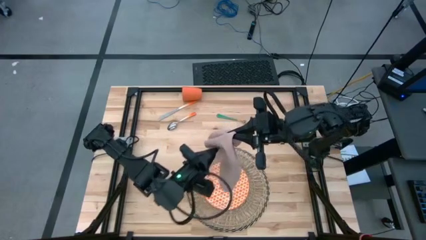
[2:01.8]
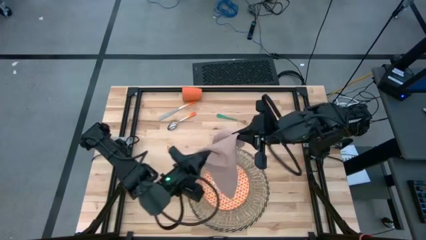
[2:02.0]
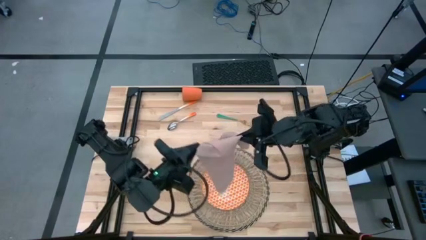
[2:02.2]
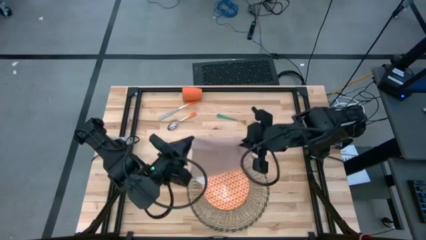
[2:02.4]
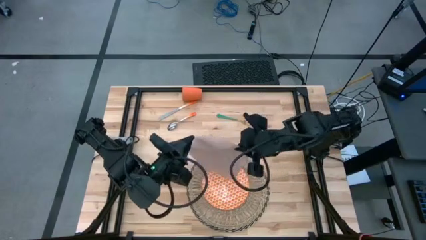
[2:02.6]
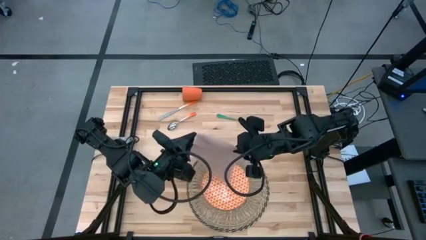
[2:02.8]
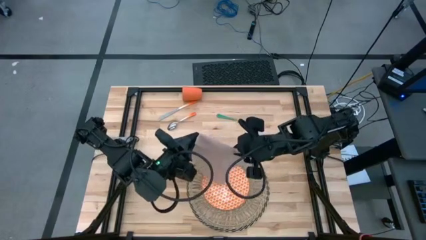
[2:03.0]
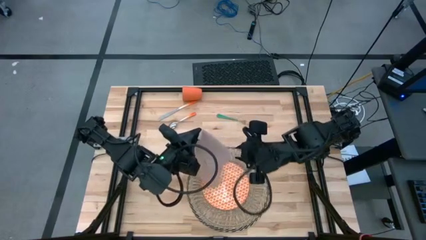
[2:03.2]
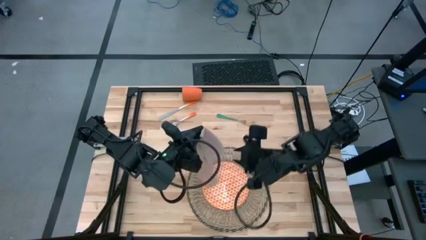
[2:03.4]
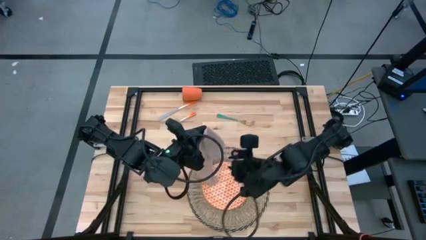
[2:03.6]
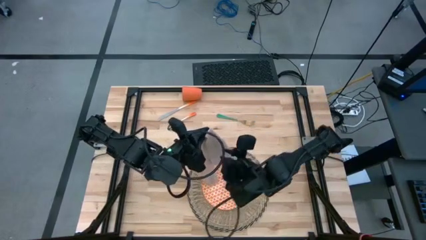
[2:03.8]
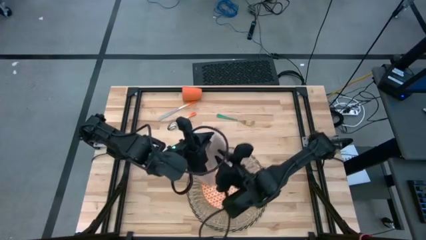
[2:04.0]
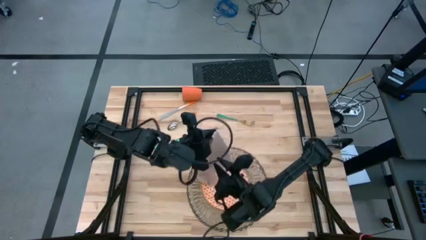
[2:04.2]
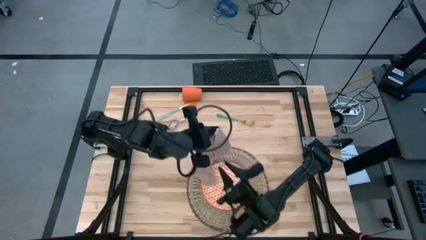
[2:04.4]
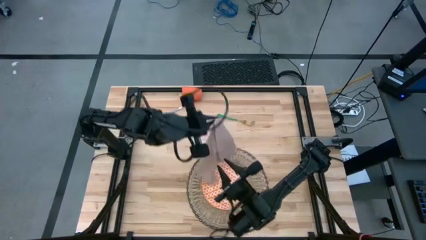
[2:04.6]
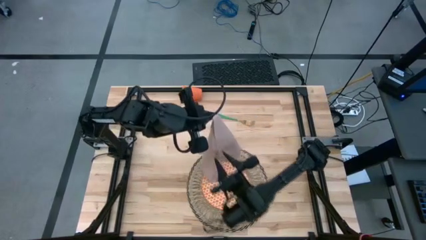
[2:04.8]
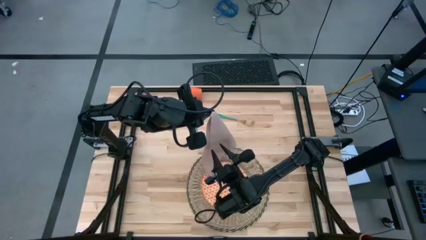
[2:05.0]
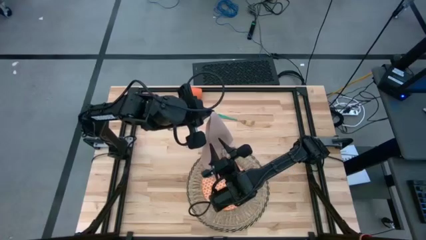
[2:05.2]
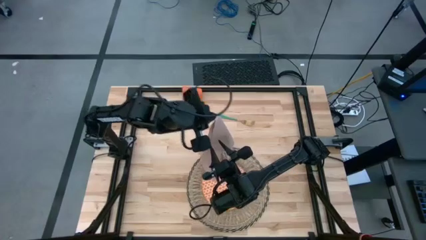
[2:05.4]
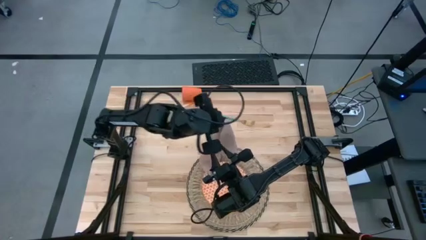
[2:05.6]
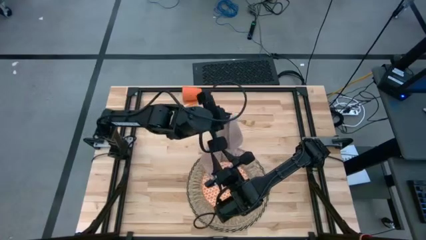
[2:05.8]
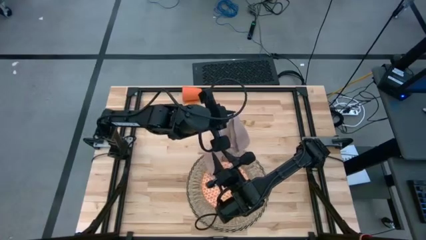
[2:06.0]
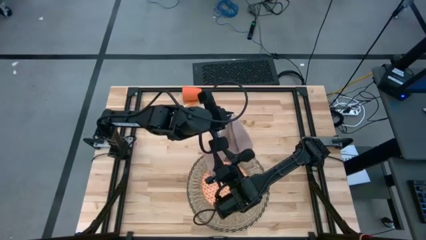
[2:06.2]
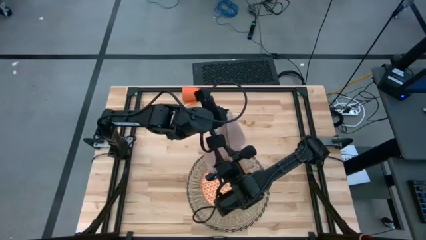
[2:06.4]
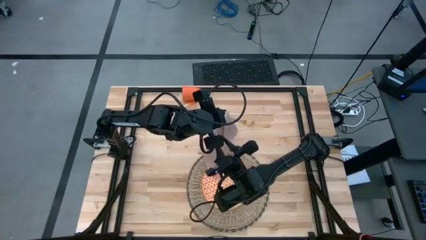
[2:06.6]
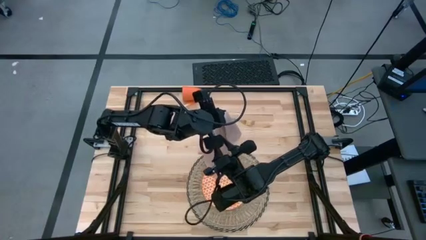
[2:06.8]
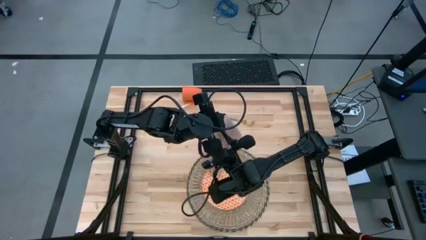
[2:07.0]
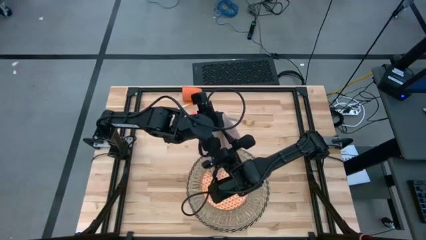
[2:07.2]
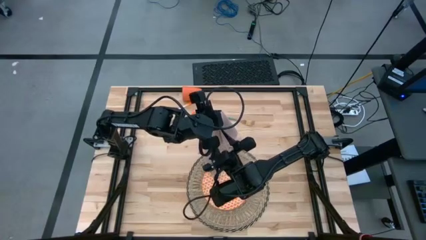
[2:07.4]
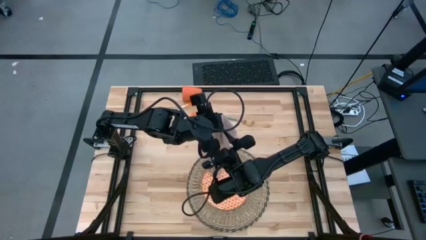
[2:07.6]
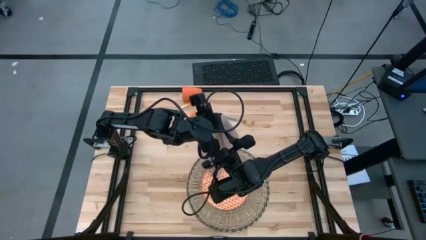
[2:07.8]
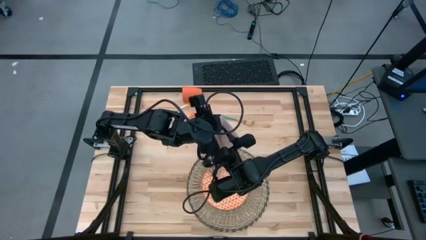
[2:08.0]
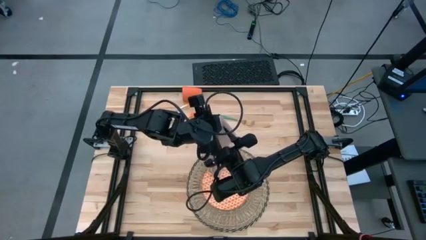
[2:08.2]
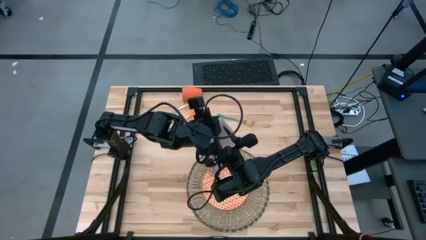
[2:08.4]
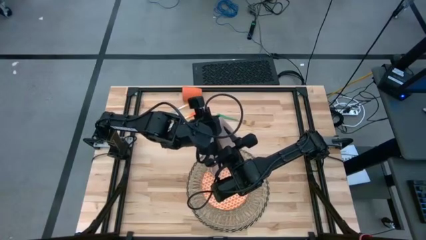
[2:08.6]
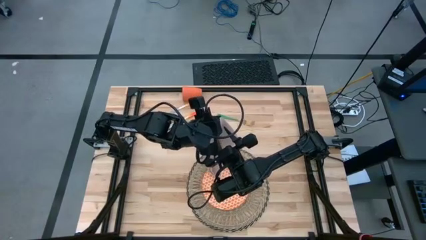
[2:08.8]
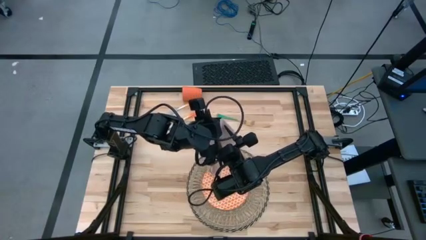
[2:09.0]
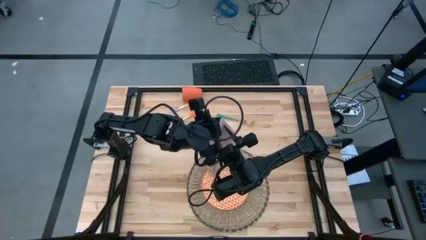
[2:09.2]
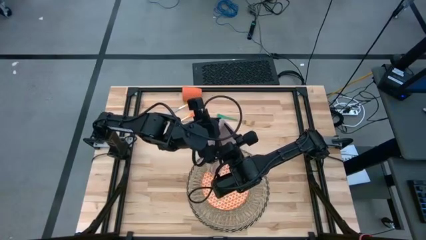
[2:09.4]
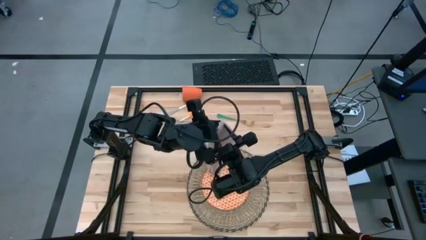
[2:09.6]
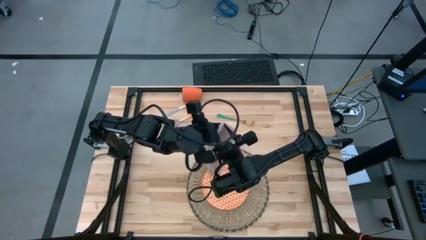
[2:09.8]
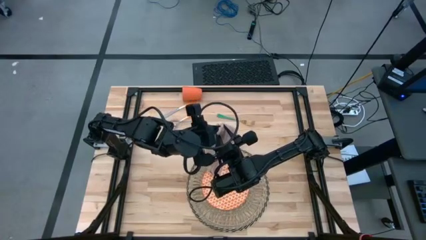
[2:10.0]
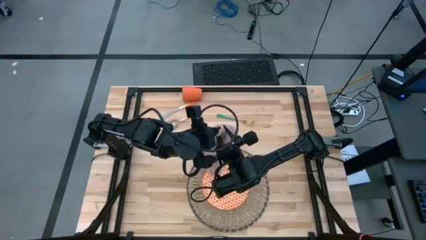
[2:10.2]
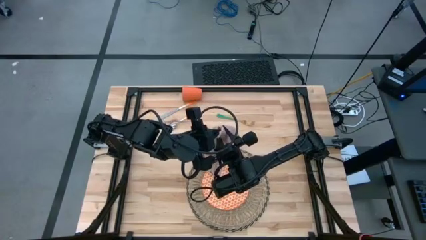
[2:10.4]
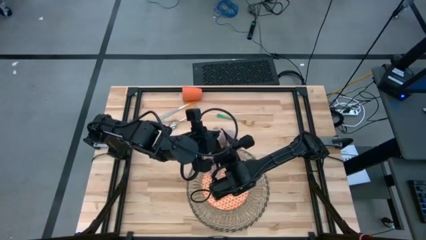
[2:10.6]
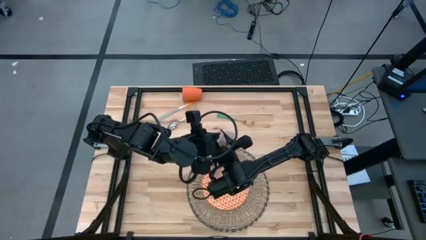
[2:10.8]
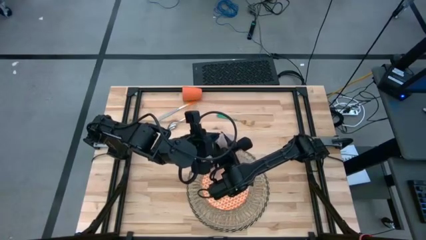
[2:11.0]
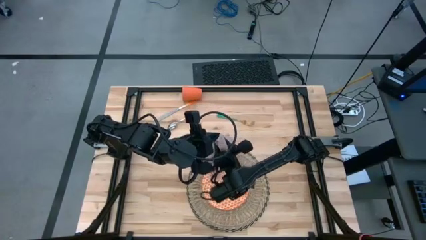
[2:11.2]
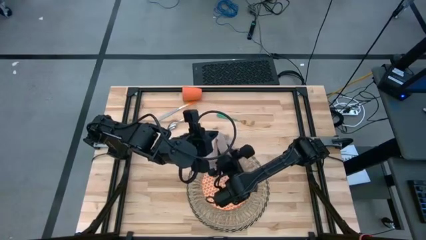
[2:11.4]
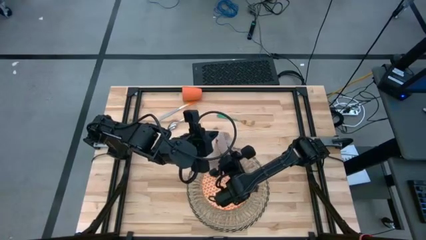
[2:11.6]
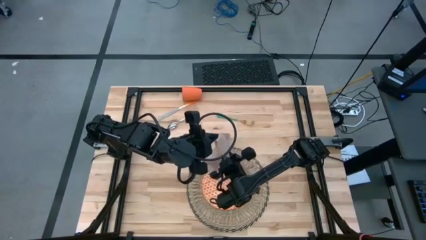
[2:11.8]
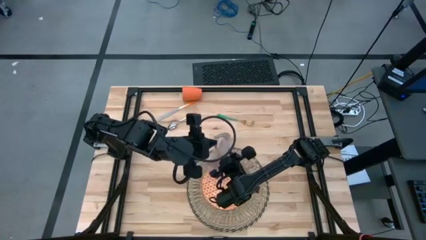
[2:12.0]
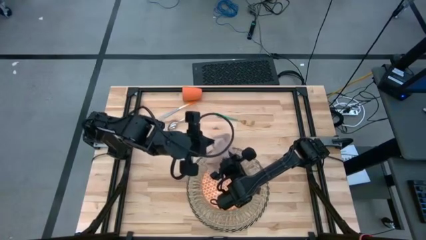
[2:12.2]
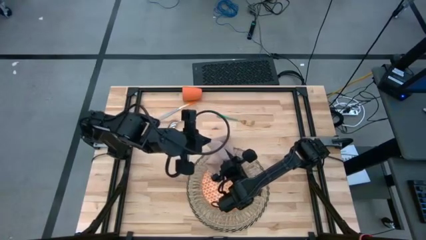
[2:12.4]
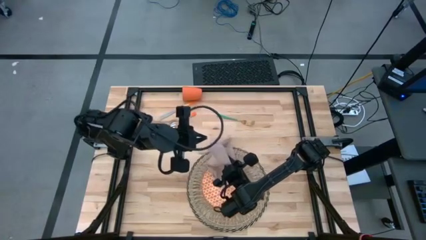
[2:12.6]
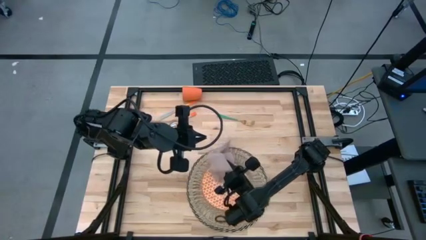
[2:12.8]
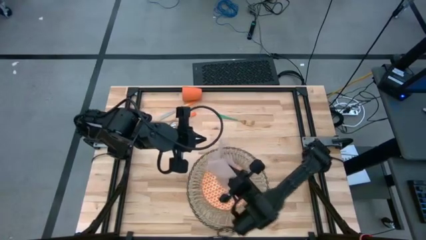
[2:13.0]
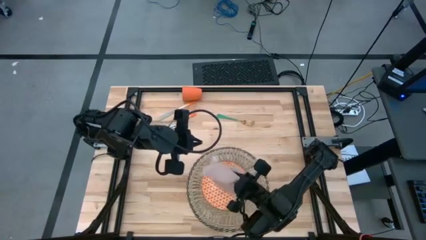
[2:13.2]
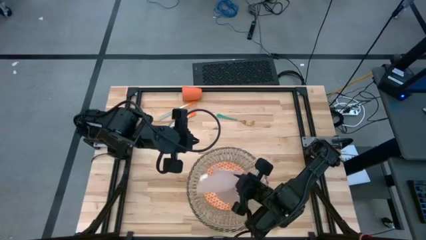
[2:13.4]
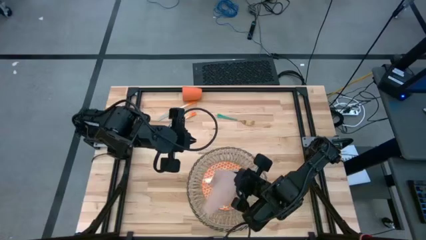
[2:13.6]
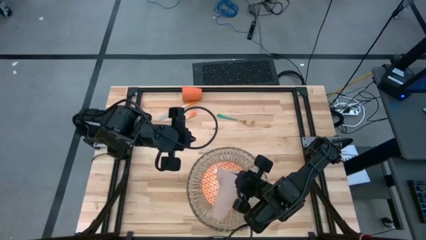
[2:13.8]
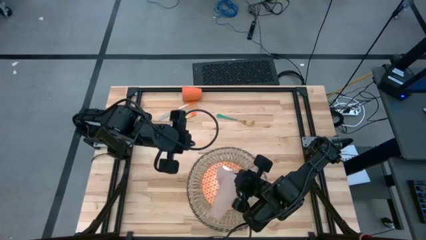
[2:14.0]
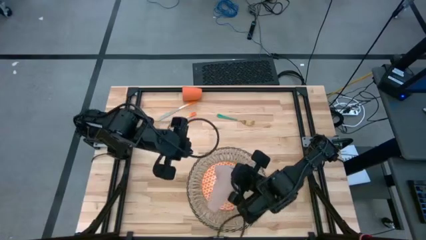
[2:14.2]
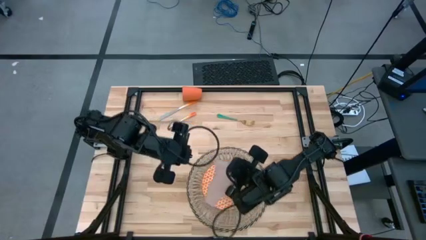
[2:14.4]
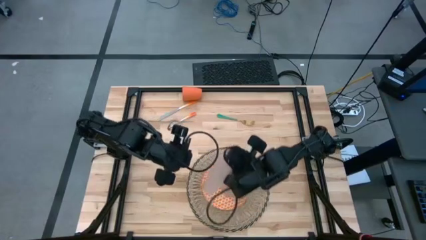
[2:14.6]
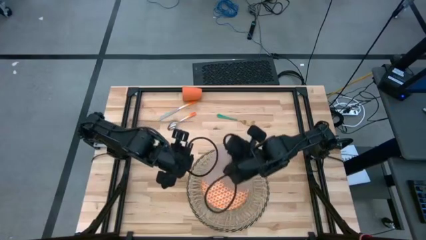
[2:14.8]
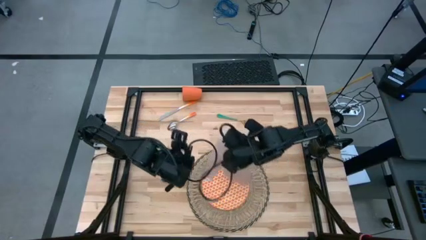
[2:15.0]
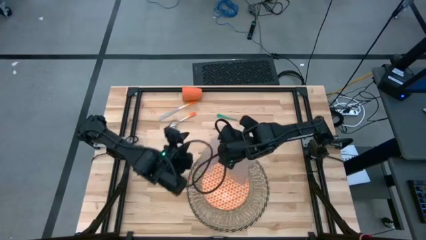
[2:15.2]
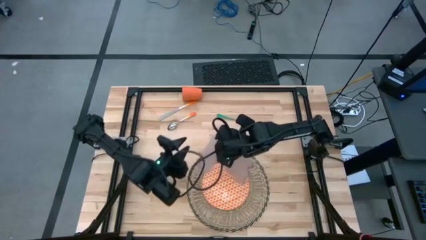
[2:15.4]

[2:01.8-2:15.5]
Task: Set table place
Fold the napkin

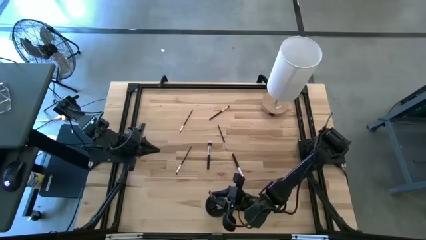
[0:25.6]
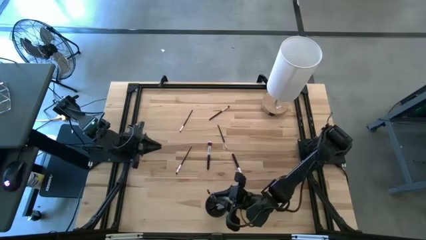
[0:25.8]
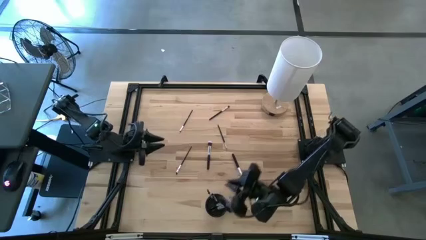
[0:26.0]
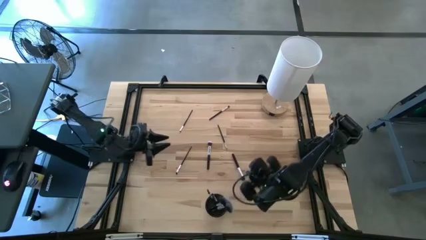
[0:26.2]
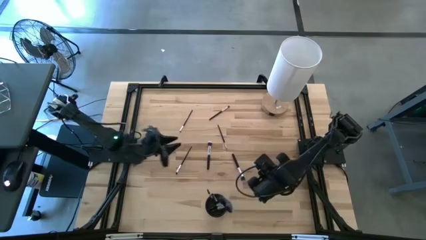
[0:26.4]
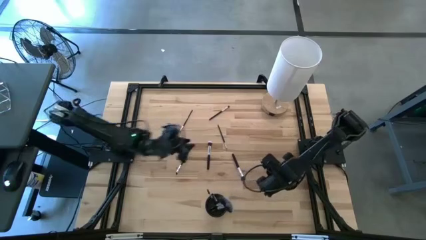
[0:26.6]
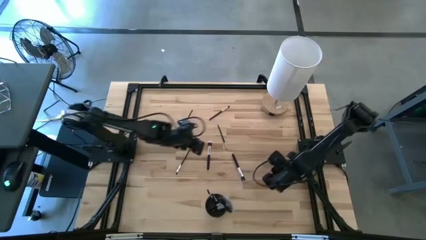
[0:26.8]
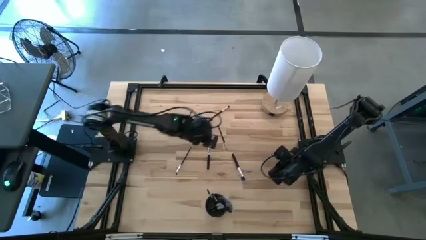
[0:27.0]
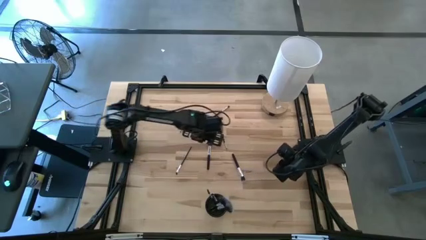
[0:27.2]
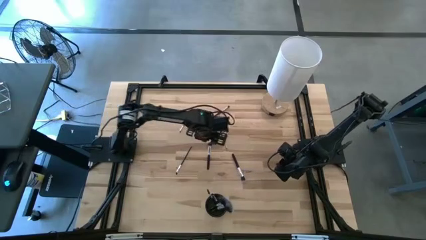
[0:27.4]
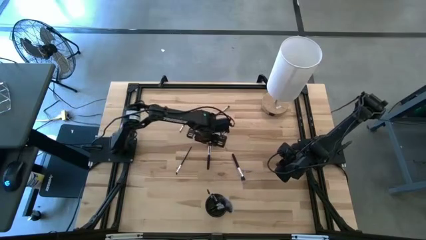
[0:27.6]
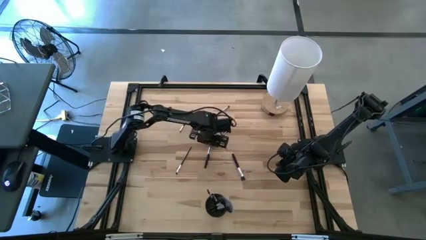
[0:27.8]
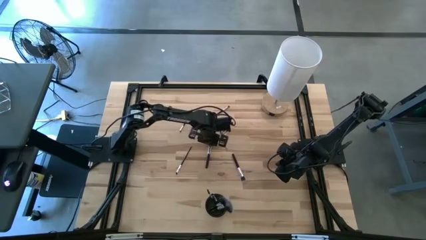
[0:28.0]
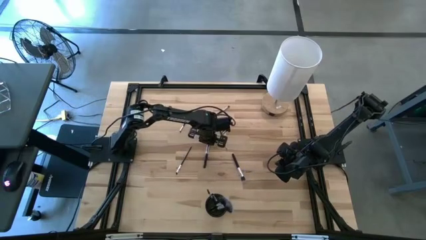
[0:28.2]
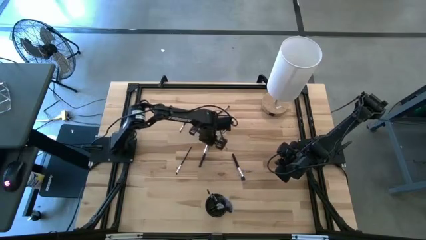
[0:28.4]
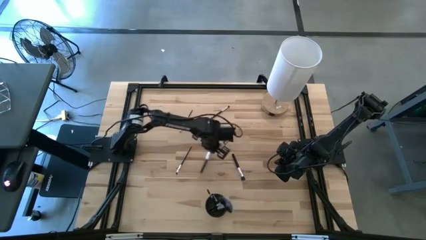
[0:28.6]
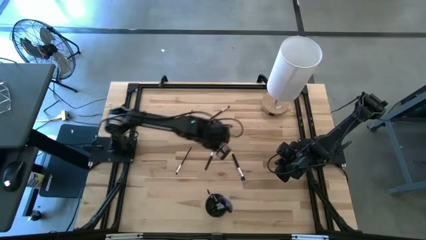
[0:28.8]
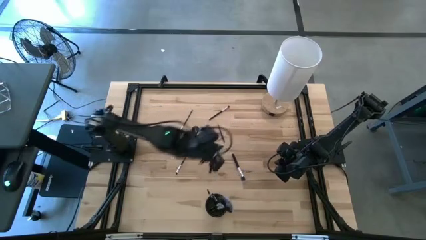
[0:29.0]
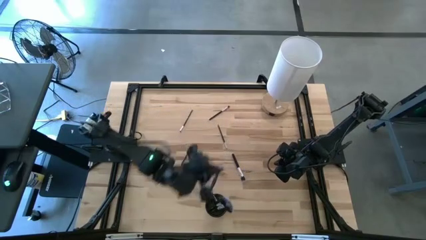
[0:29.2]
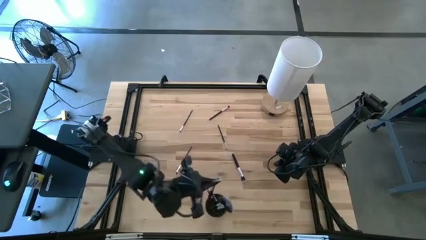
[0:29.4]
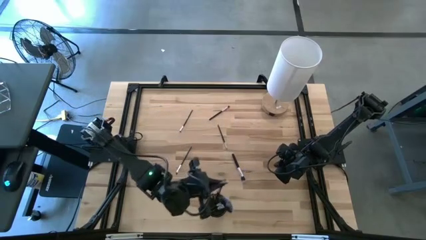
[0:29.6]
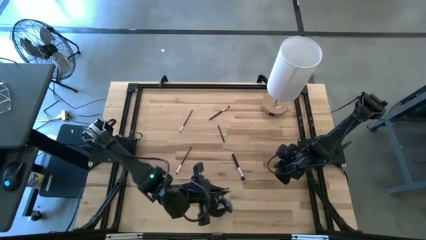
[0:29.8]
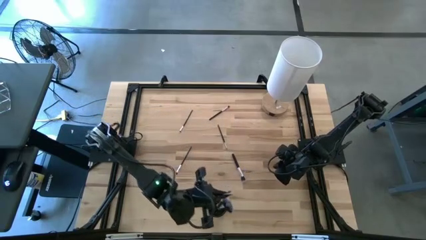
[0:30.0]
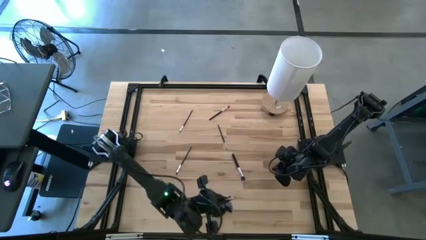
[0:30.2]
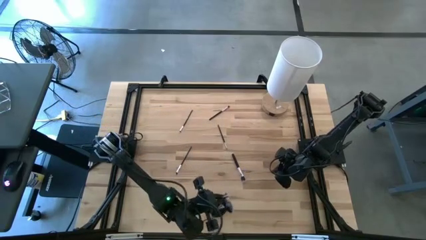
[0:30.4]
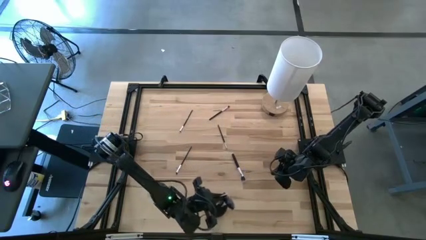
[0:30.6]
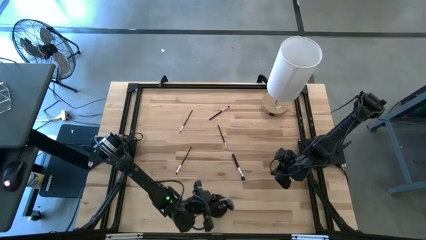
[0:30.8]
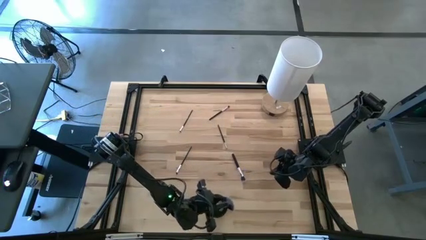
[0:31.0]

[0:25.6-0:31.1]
Task: Put items in baskets/containers
Put the left black powder brush into the black pen holder
